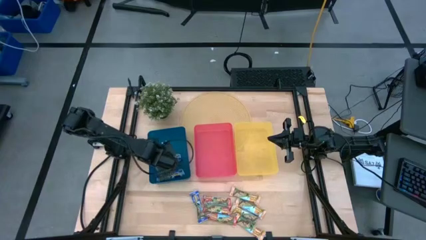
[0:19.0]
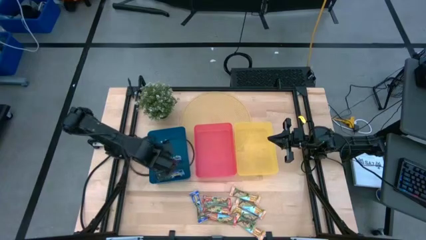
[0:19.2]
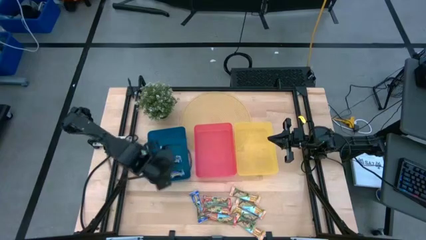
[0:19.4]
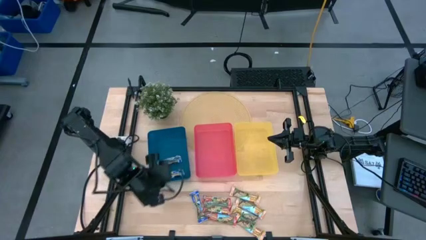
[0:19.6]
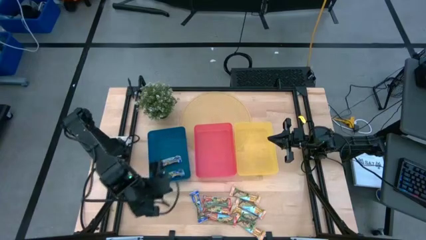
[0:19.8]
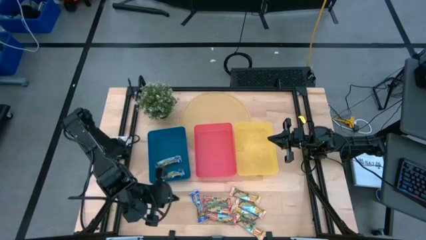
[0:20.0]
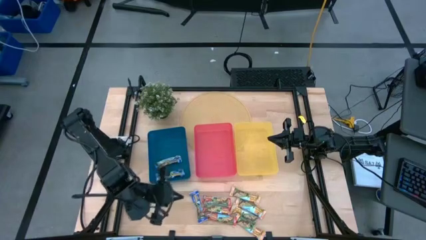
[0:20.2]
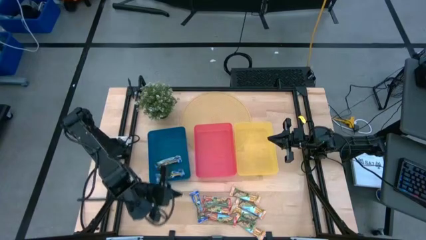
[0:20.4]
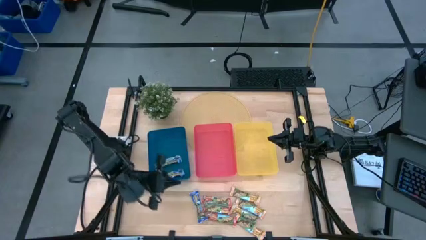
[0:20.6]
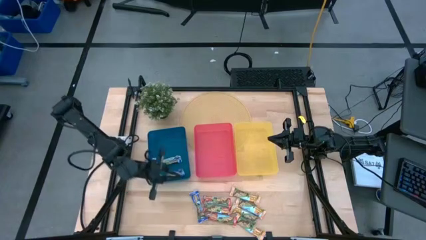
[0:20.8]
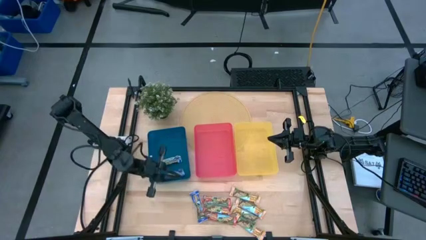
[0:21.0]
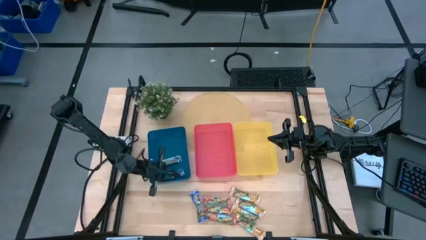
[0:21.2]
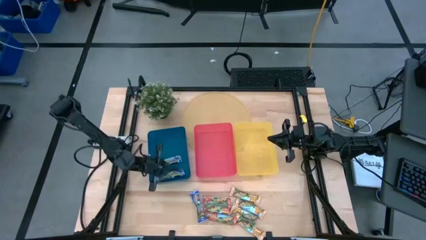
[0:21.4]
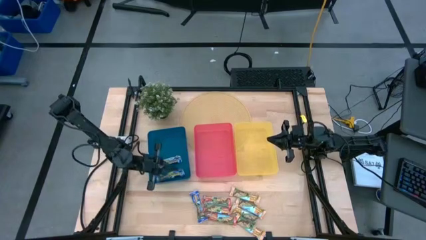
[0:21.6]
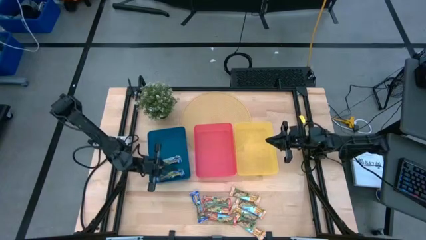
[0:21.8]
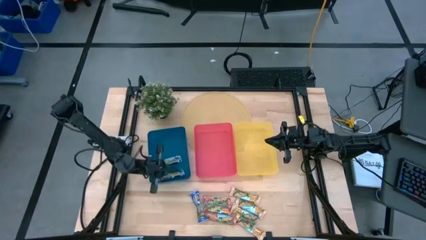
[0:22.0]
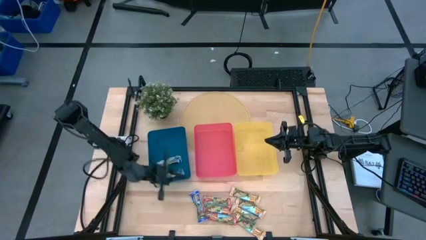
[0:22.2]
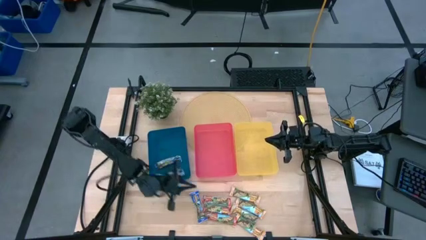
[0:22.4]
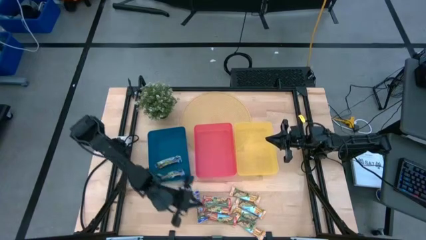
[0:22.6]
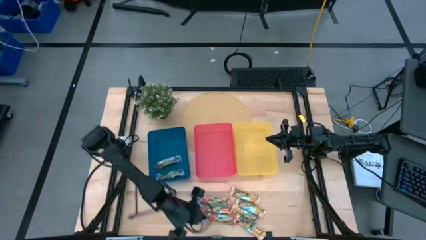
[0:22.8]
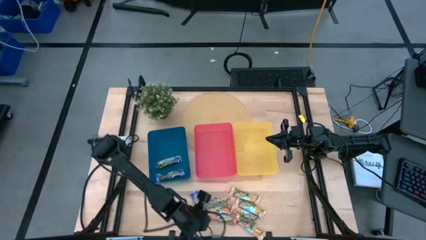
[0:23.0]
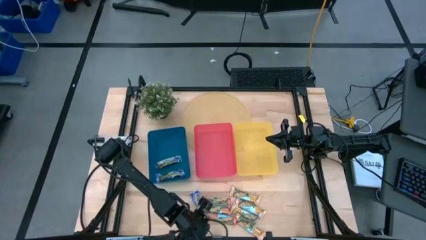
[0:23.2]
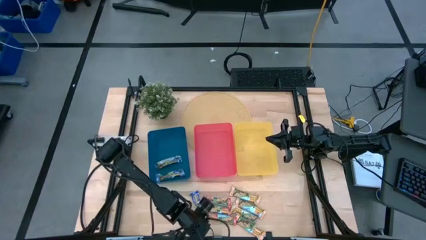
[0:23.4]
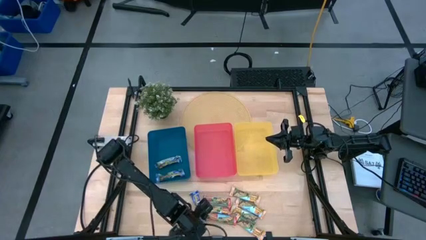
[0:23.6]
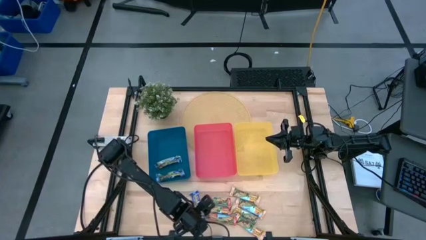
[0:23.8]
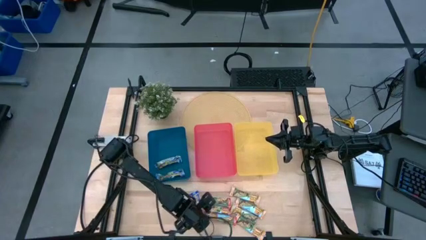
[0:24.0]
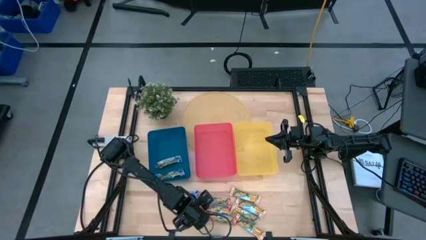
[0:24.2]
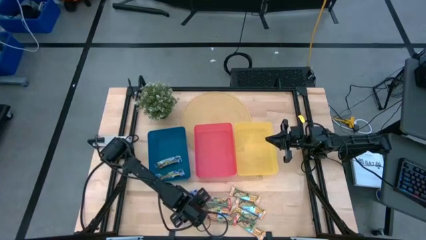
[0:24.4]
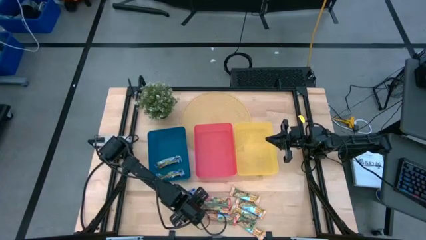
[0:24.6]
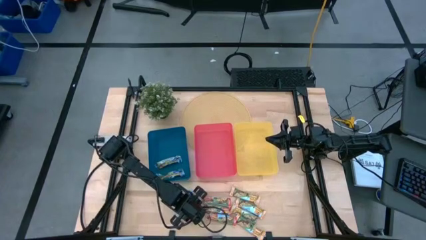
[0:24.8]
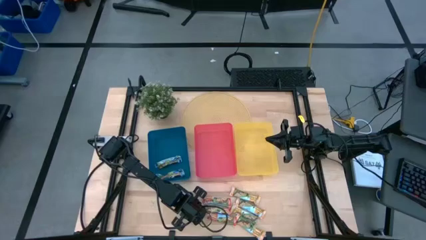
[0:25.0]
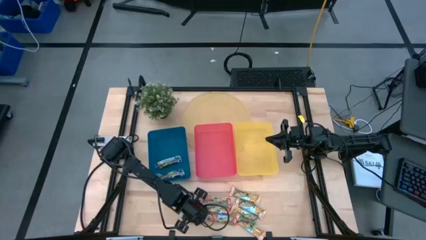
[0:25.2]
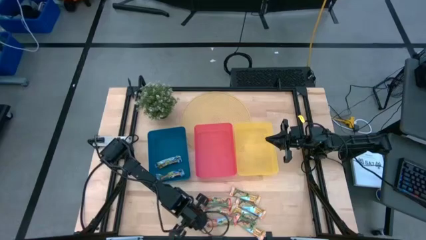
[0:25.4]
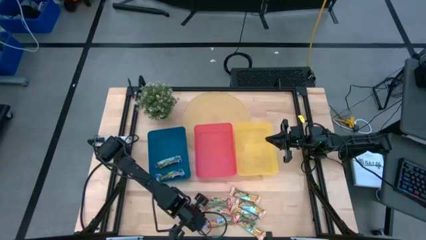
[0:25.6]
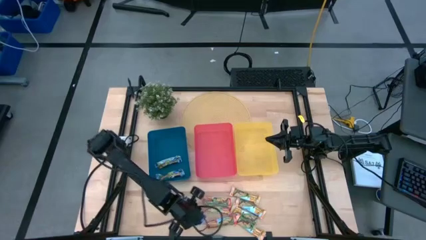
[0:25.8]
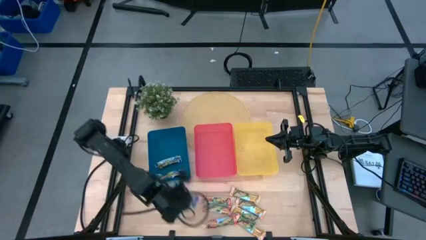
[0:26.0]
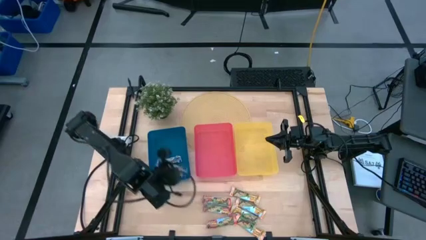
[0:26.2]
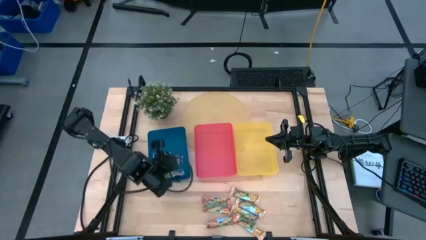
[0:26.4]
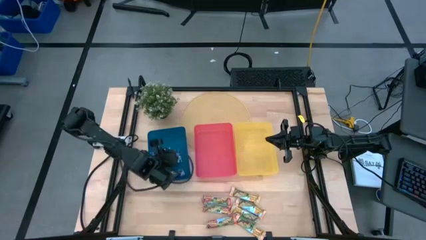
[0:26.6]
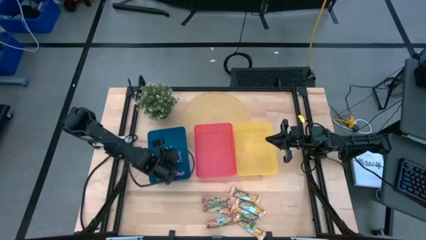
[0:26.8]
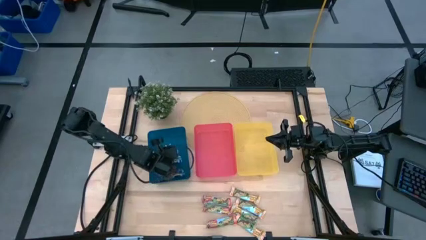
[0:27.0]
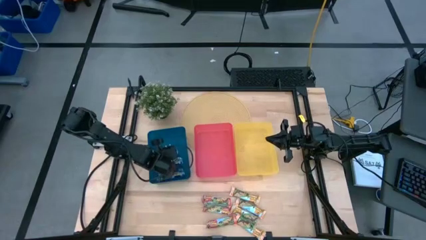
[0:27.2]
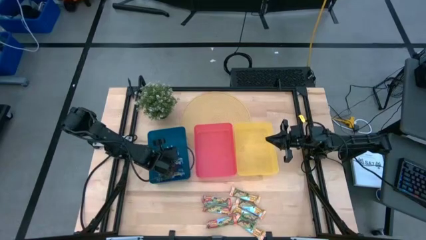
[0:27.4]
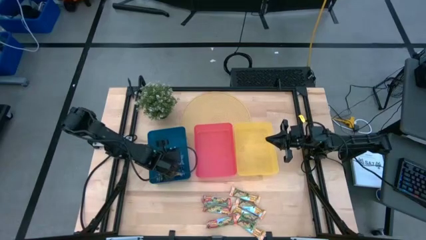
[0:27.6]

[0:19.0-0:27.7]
Task: Pick and place Granola Bars by type
Put the blue granola bar into the blue bin

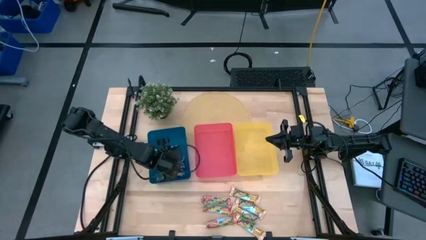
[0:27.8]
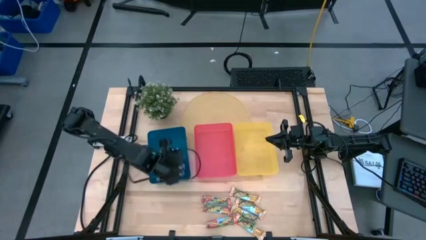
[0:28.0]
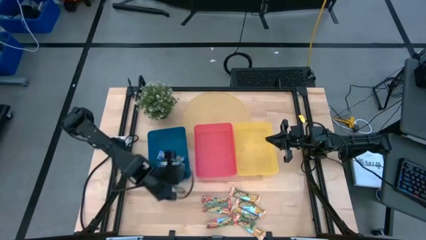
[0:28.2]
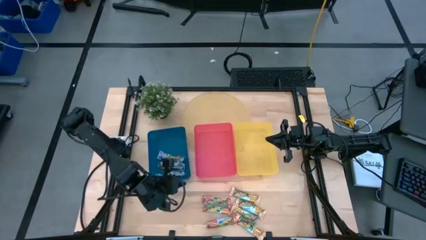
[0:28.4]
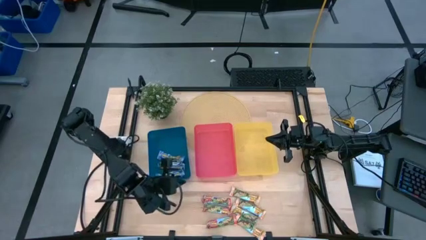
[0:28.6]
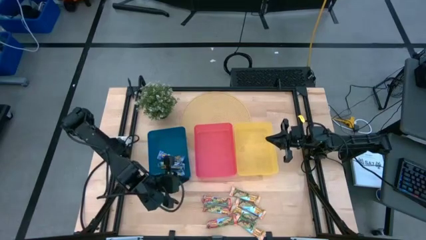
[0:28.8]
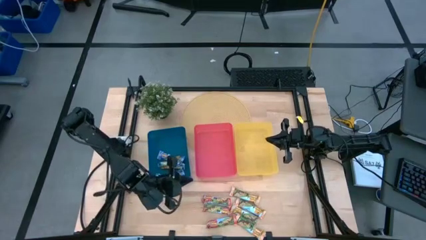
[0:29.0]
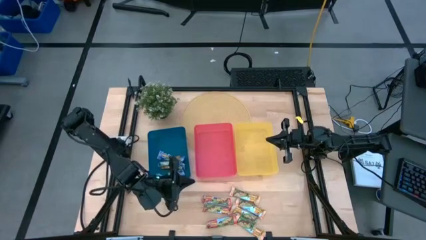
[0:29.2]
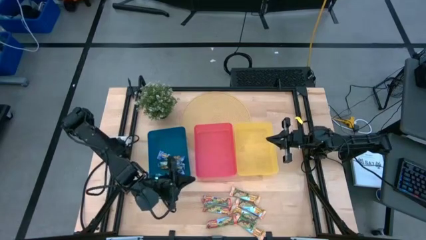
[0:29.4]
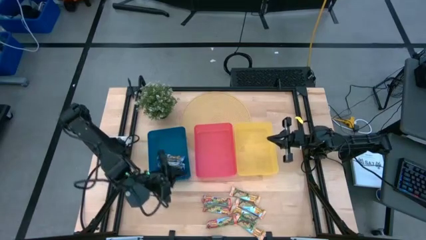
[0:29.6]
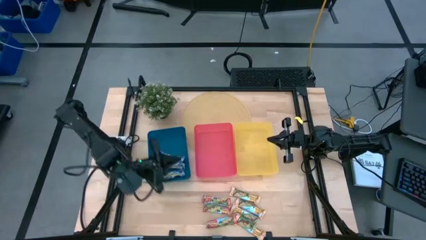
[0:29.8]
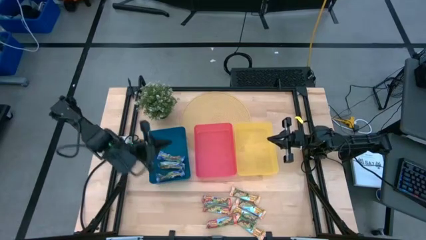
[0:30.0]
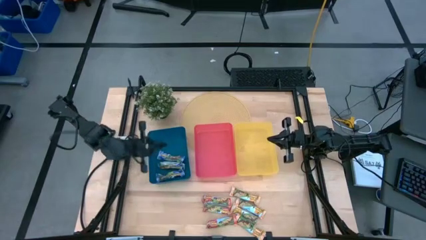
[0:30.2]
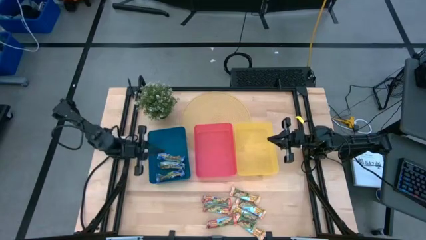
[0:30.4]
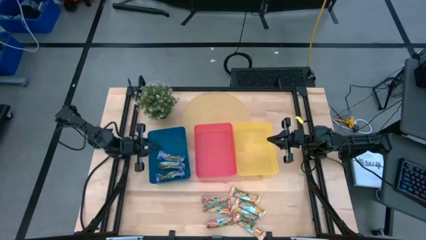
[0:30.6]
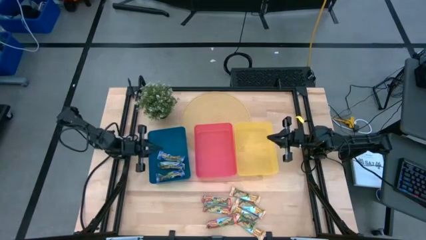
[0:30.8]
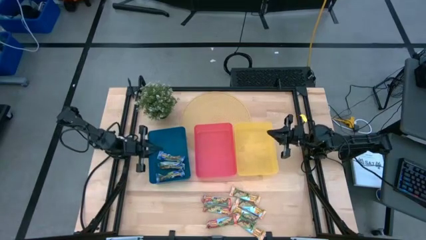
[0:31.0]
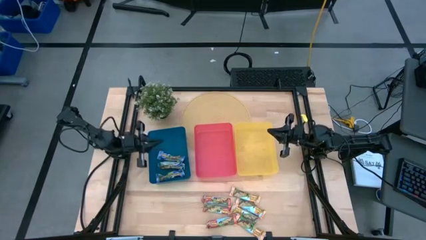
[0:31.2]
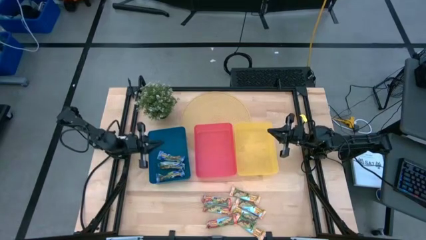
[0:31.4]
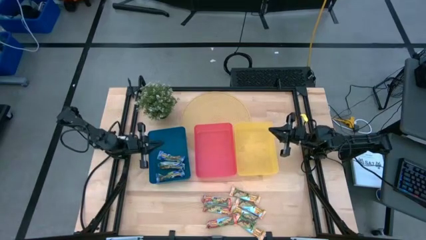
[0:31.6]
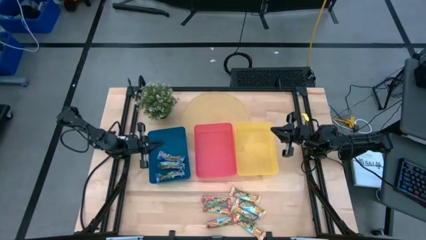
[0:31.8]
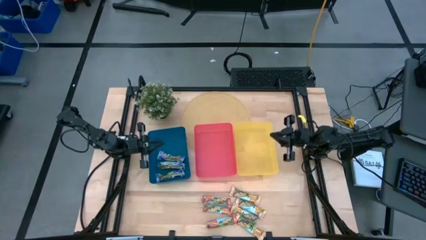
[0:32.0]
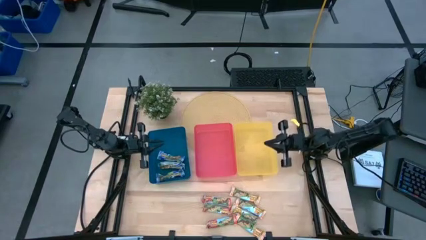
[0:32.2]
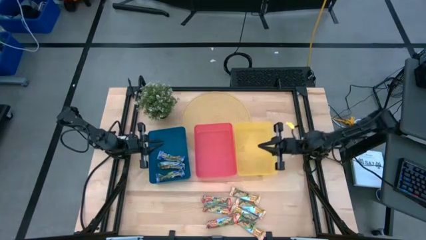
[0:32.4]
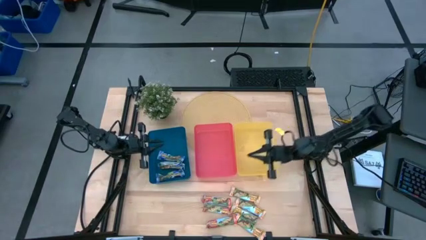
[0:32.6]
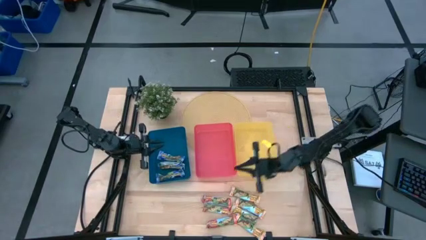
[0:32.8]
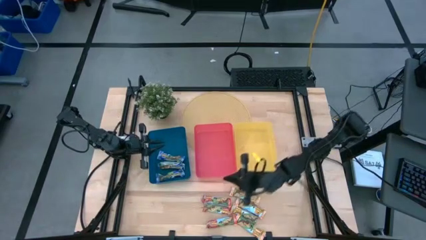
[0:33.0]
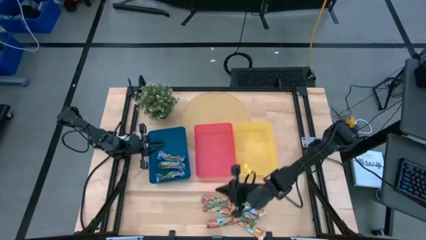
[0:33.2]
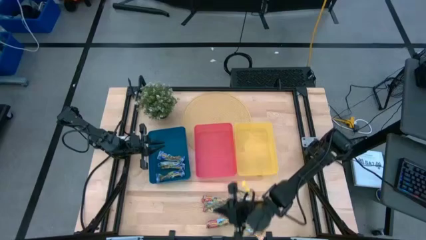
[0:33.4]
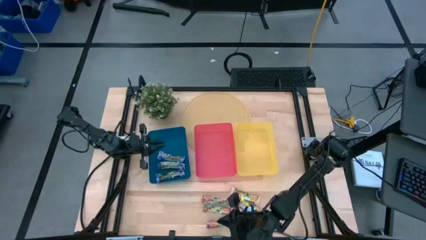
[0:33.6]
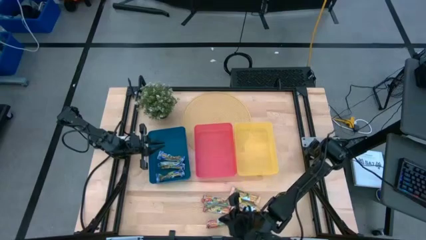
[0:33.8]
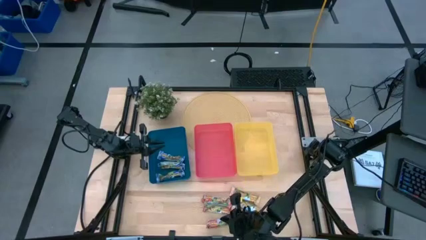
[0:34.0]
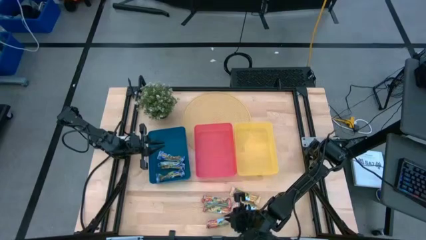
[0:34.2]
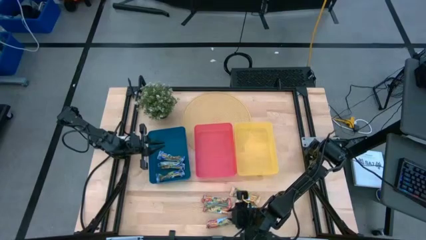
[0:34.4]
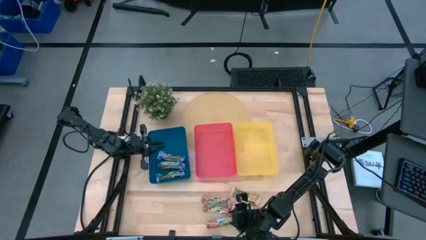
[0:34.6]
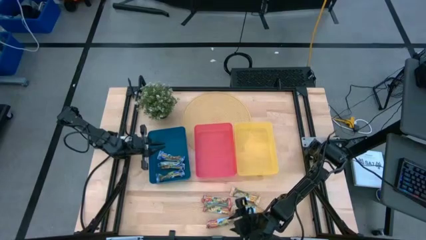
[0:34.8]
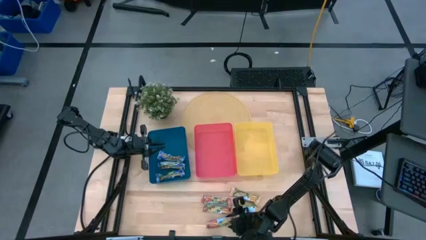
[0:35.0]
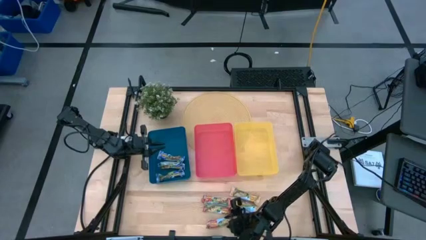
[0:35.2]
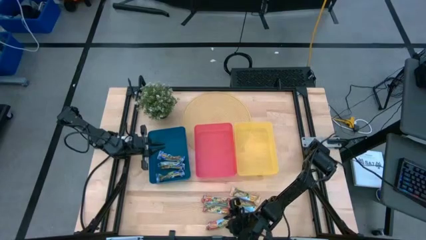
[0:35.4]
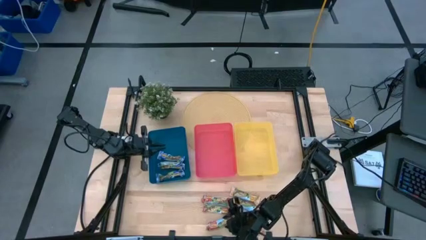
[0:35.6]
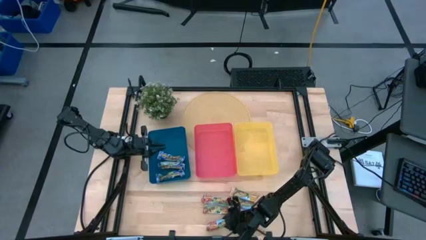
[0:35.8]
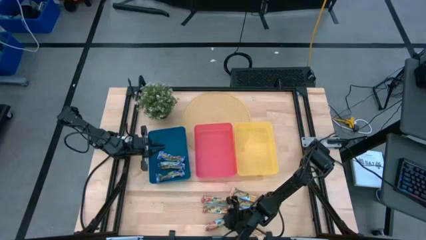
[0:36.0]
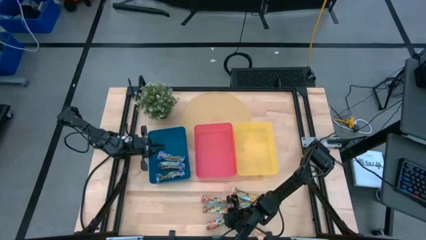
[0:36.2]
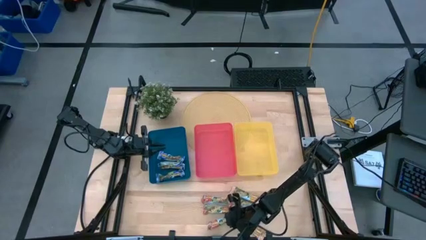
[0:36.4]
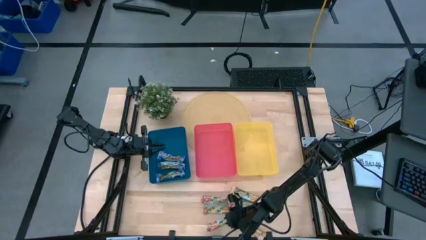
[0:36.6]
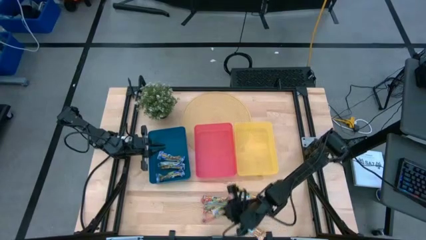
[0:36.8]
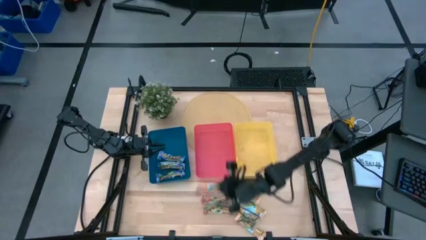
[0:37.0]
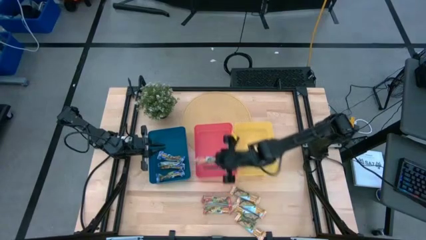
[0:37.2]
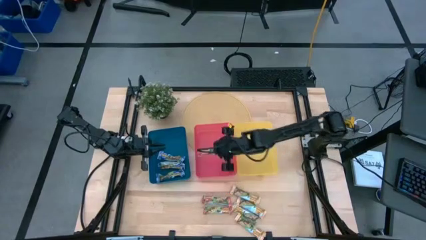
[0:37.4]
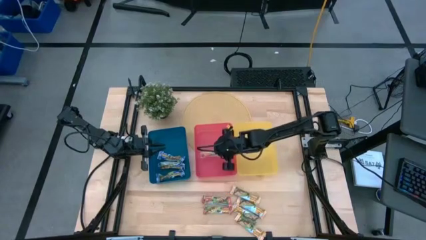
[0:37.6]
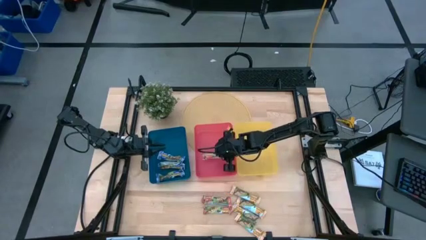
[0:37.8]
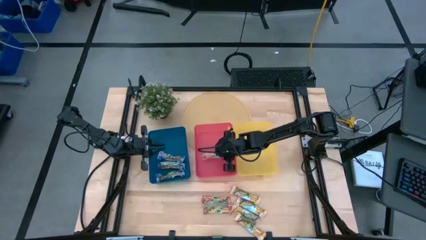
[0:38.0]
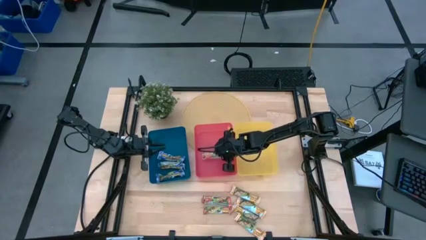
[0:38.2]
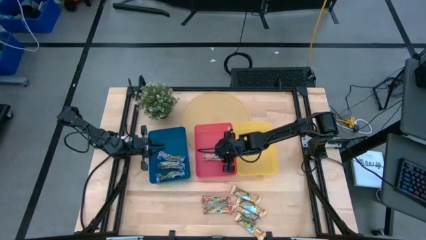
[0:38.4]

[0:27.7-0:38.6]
Put the red granola bar into the pink bin
